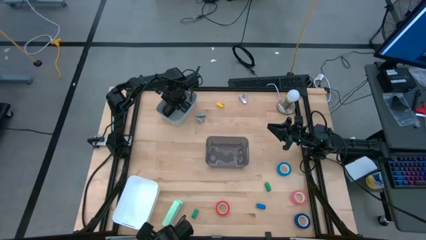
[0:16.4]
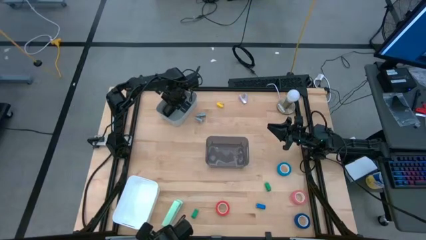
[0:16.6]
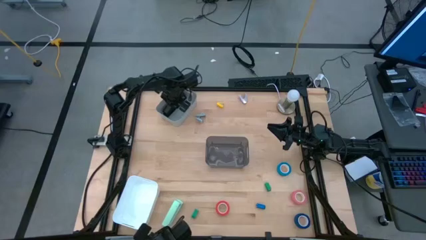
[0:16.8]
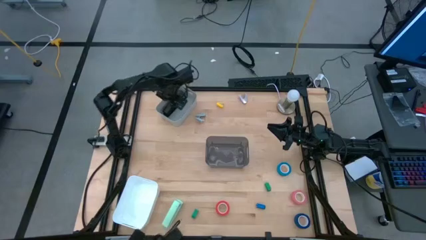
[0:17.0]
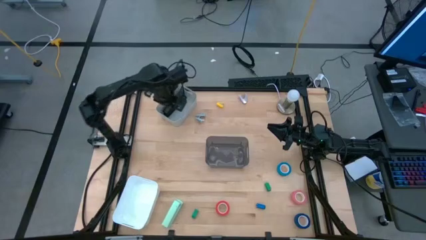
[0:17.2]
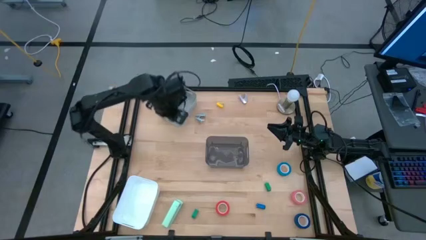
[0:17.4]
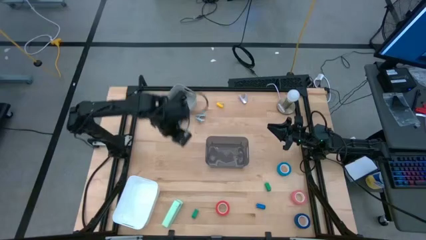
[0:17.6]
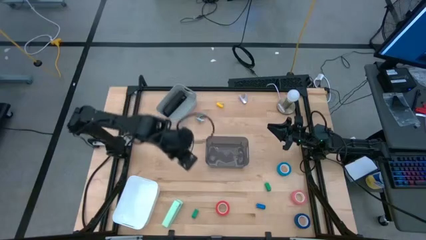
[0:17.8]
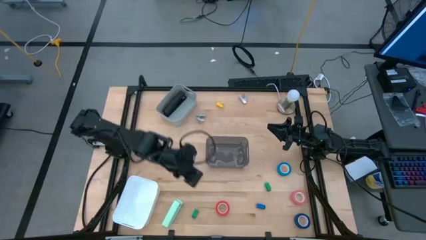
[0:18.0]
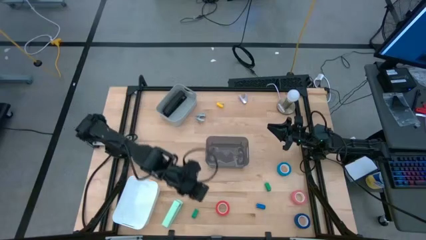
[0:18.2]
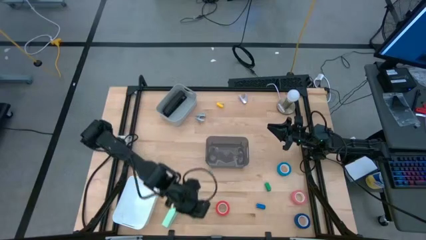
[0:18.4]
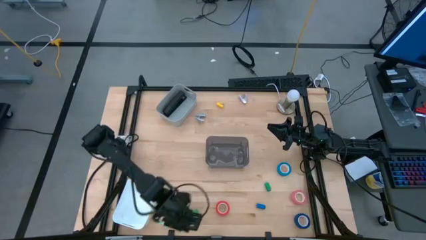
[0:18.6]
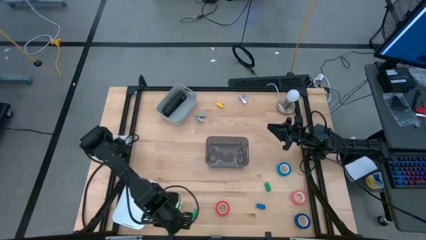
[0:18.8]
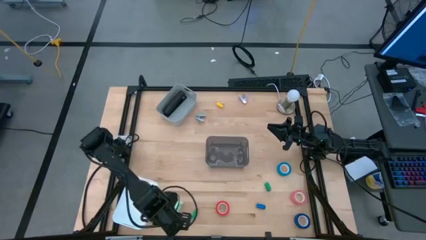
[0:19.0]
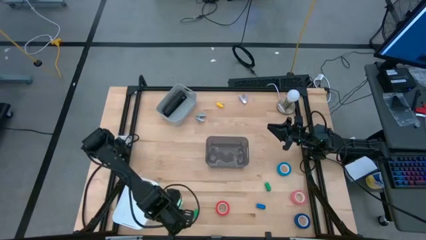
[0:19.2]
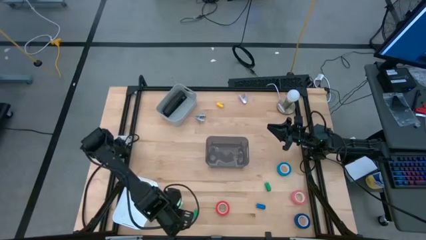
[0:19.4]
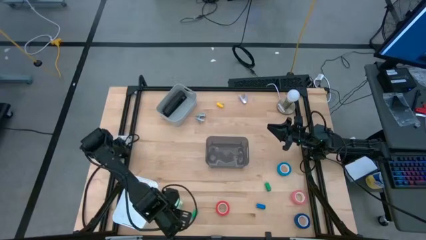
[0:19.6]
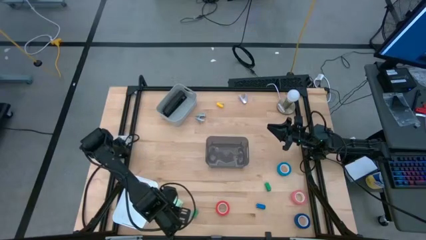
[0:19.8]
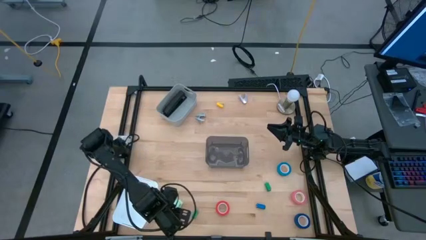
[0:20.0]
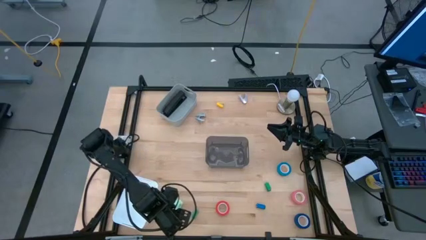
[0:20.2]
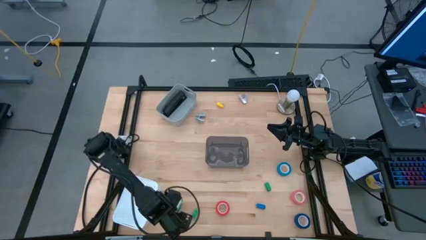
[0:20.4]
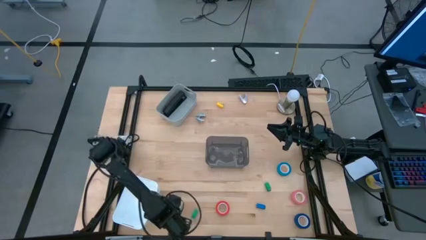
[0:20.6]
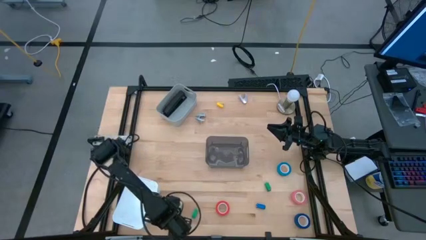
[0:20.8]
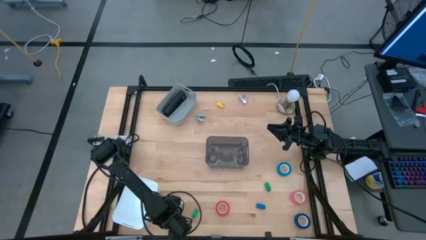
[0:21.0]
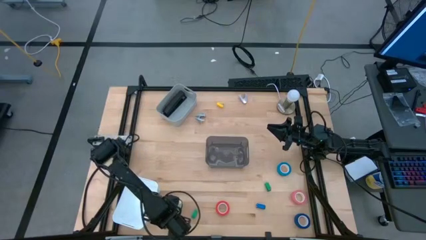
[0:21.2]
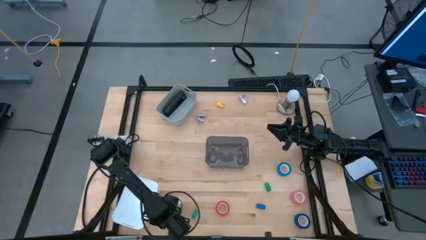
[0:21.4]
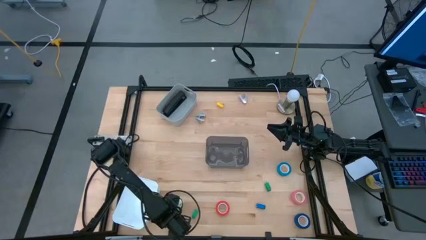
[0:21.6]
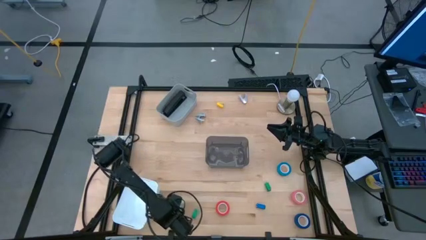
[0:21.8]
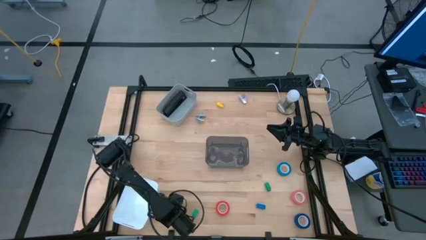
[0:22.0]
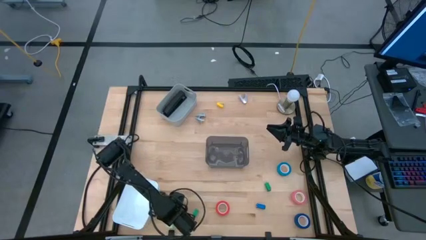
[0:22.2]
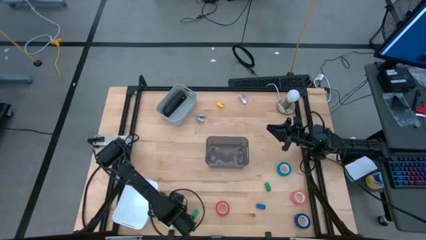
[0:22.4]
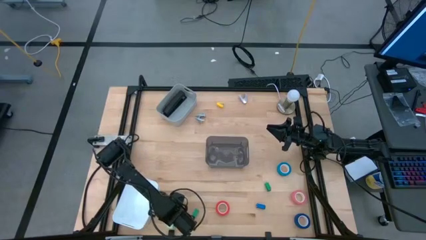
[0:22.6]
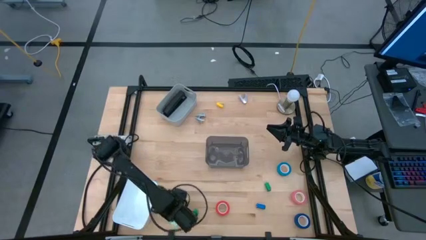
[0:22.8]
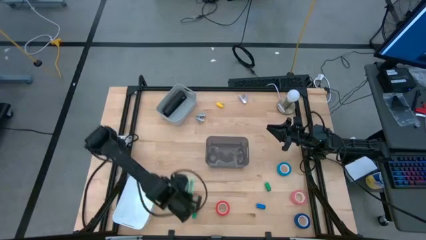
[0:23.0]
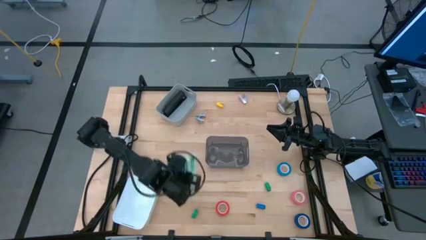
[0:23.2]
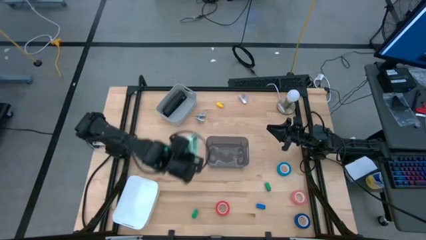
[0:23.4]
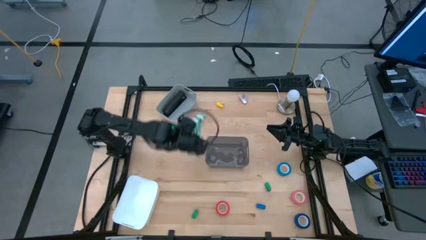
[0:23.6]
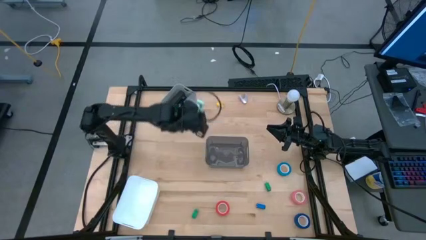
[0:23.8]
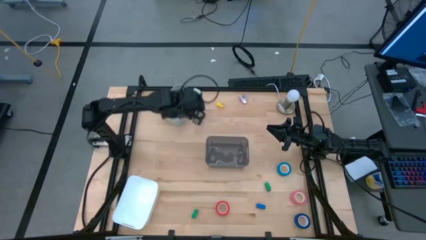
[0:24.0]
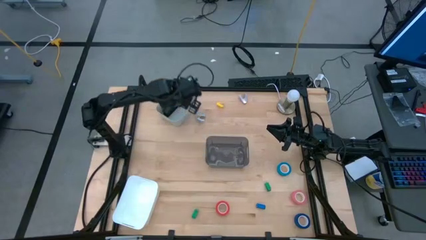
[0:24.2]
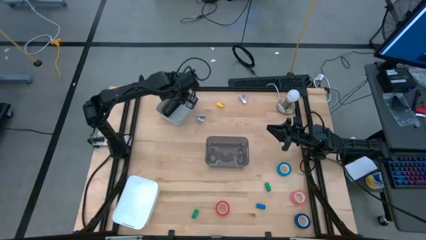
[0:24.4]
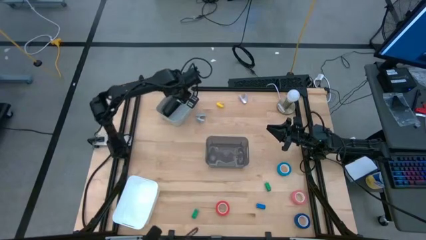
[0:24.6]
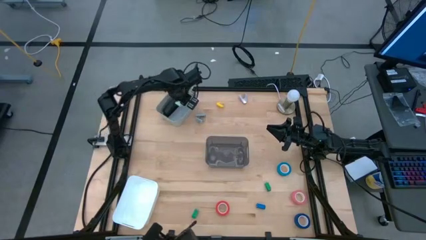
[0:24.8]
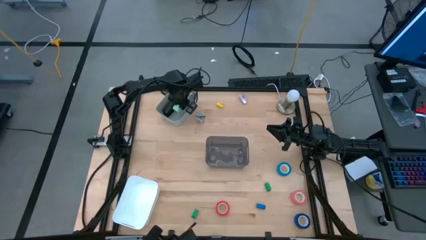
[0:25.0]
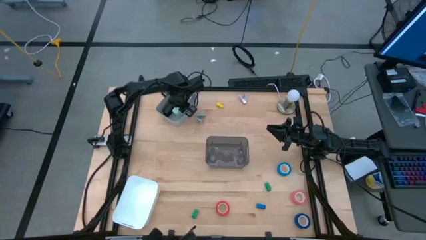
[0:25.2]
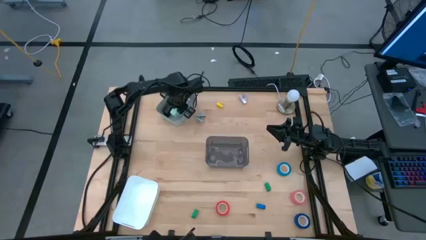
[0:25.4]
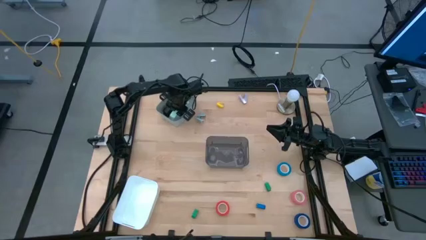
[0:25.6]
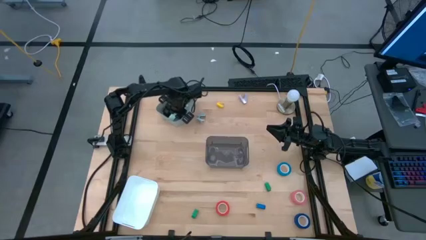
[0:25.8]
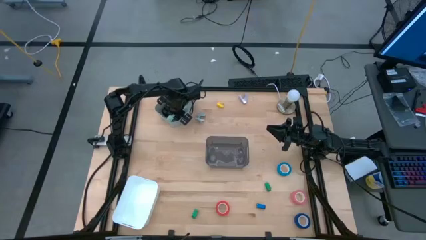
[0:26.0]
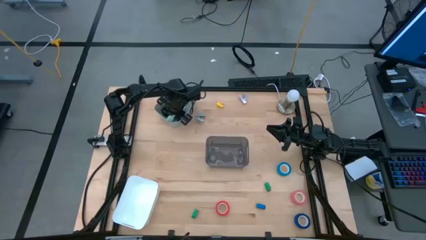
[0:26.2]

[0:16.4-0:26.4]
Task: Pick and place Stapler, Stapler remover, tape
Put the light blue stapler into the gray bin

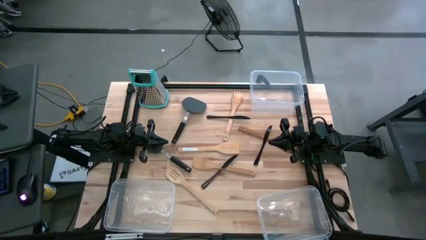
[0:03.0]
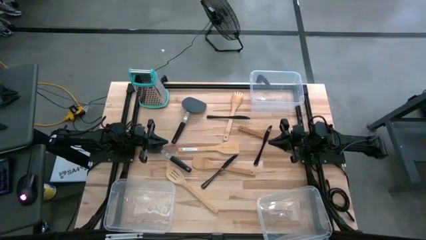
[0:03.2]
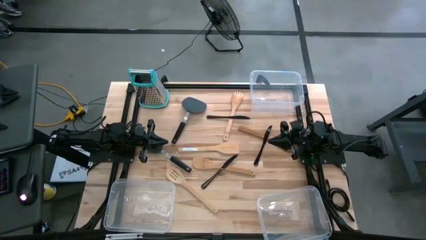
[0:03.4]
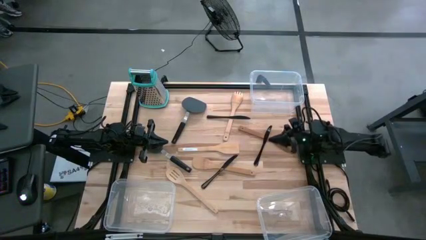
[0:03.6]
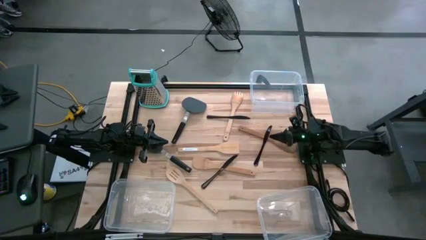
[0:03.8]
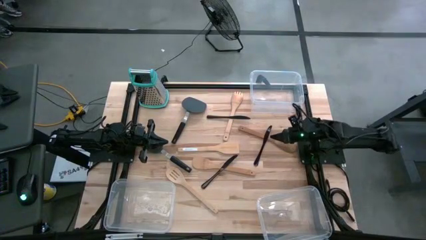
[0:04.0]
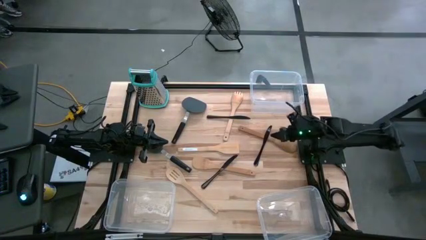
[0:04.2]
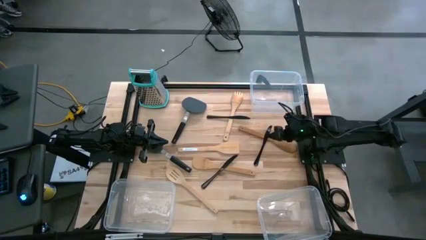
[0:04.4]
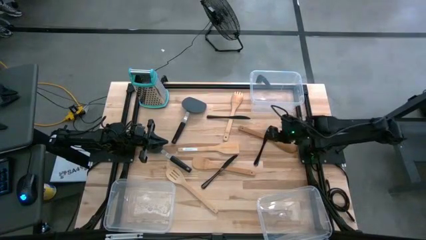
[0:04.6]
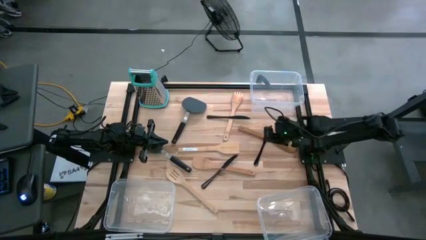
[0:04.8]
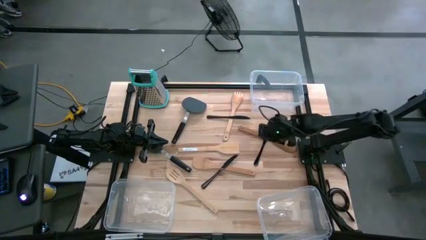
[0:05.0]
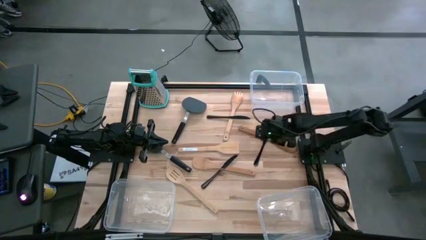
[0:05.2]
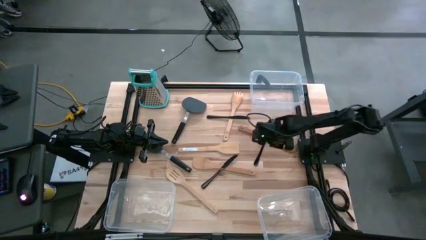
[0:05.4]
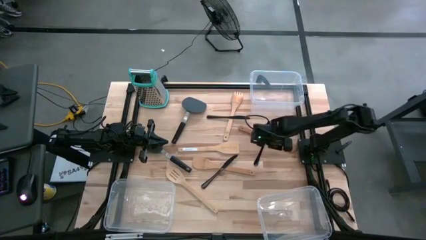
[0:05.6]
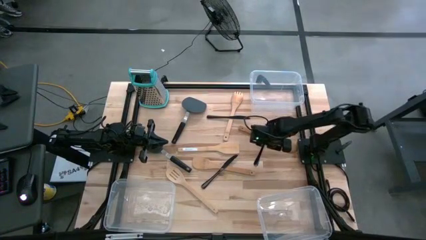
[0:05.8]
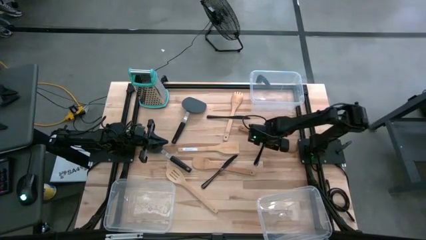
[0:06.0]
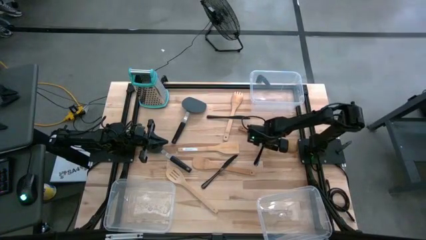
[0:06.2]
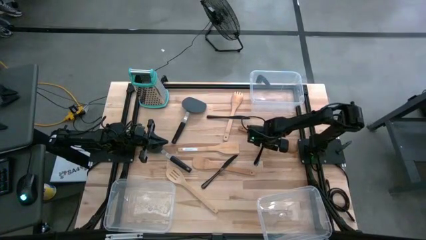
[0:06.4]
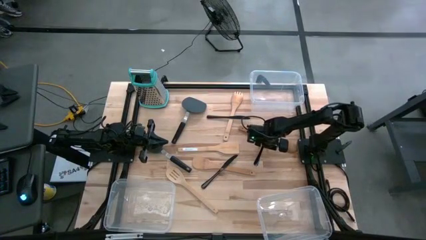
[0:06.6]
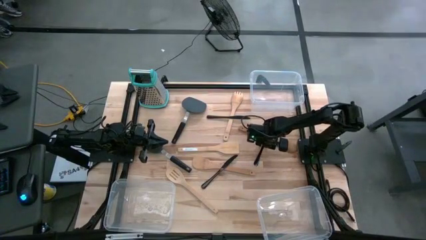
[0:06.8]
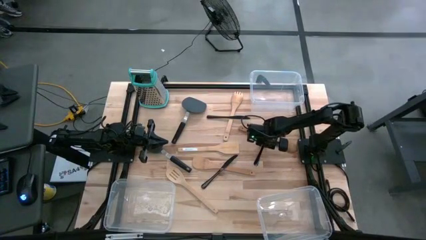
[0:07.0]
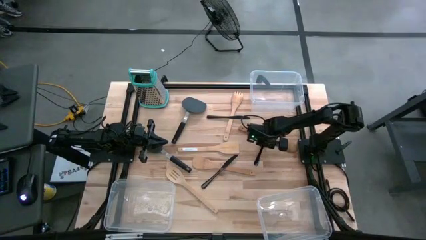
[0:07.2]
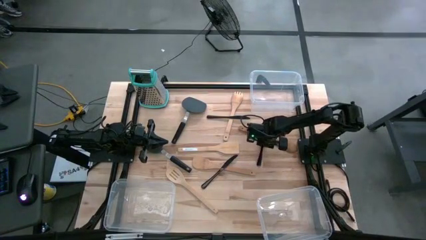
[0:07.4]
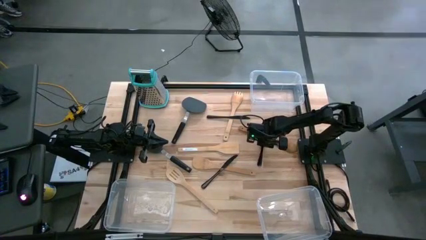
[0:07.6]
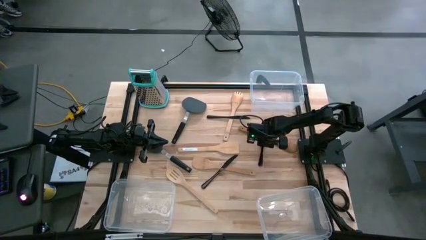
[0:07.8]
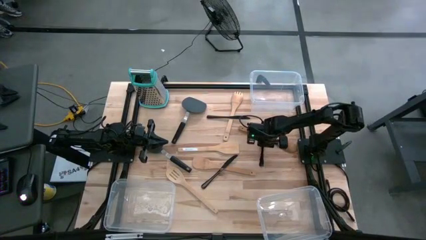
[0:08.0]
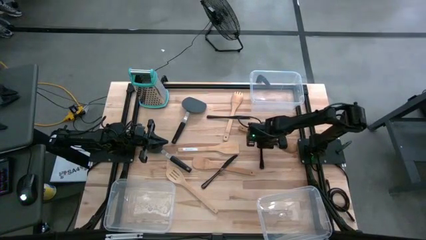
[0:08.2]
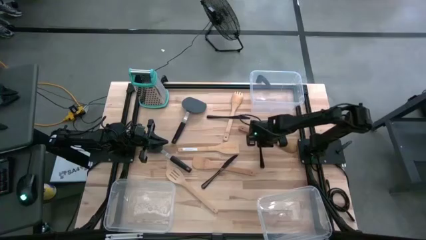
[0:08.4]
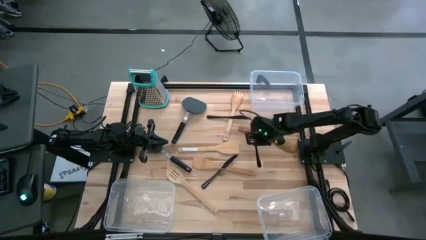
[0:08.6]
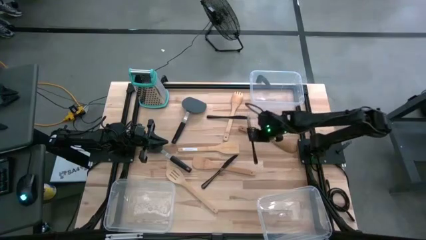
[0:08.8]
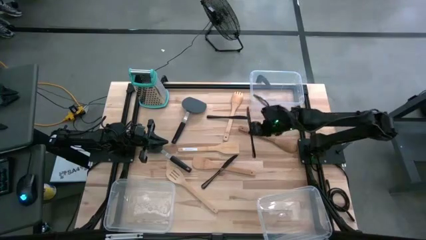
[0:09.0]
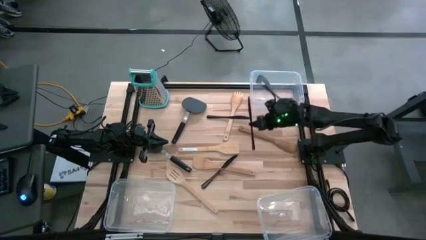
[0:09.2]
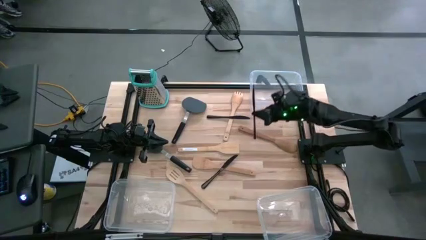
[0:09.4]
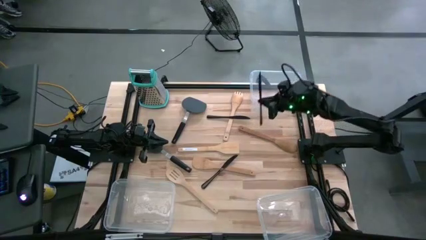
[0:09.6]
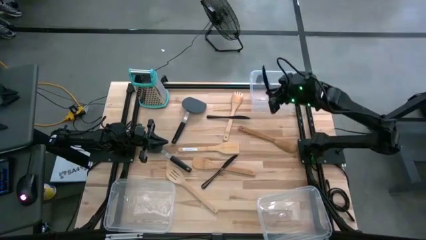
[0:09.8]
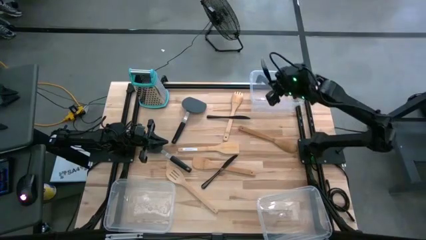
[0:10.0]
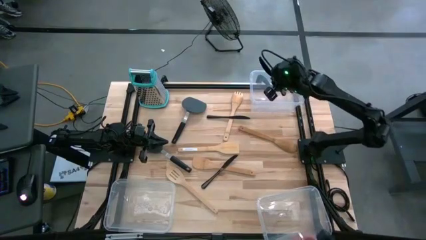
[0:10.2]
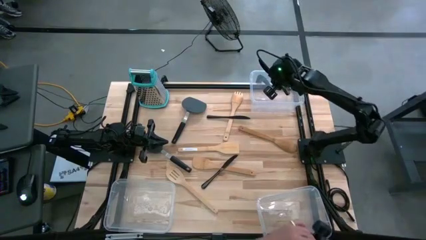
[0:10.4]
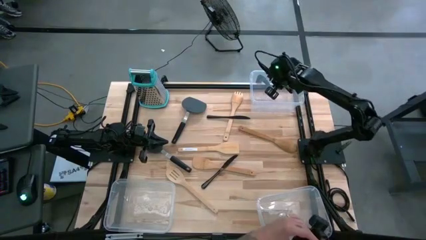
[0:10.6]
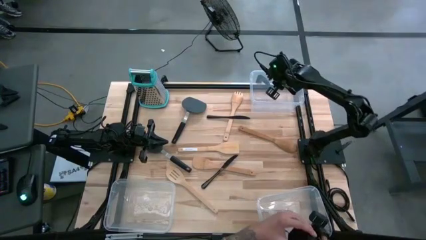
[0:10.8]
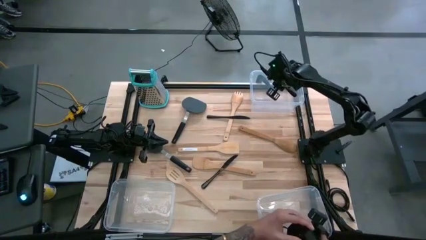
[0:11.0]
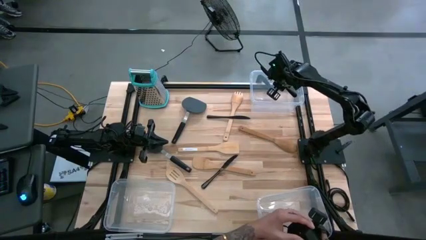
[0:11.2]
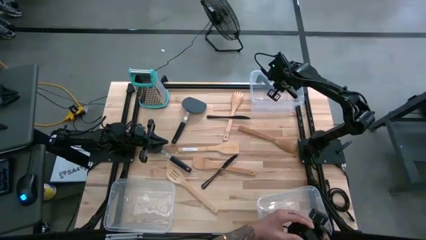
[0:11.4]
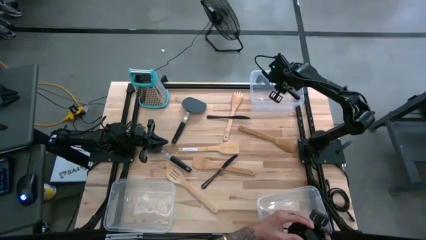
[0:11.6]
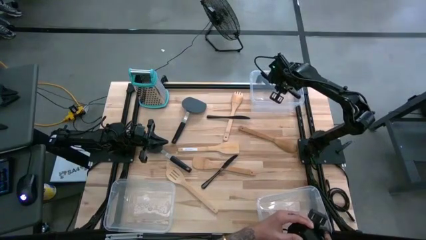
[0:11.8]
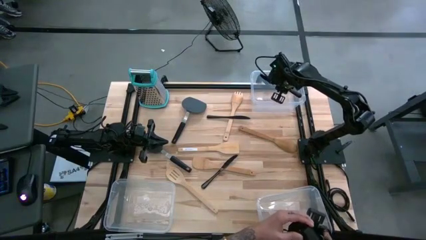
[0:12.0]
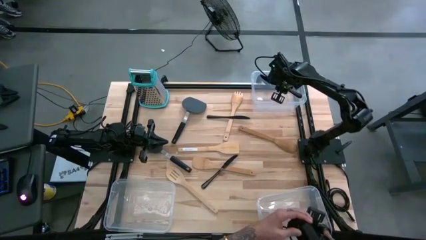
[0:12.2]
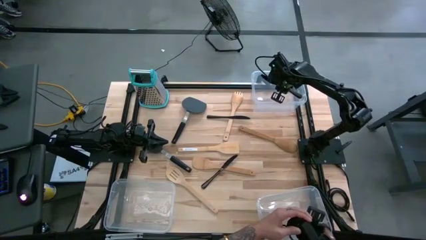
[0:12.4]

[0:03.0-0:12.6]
Task: Pick & Place Kitchen Items
Put the middle black knife into the top right transparent bin
